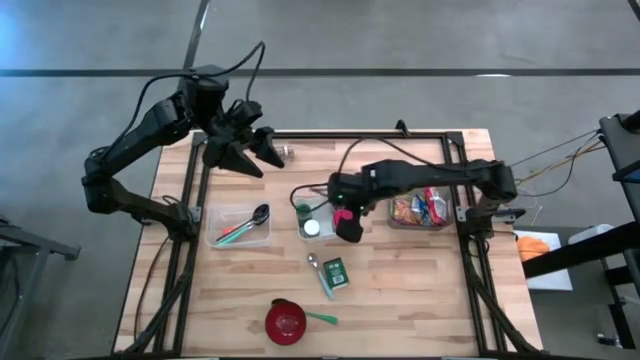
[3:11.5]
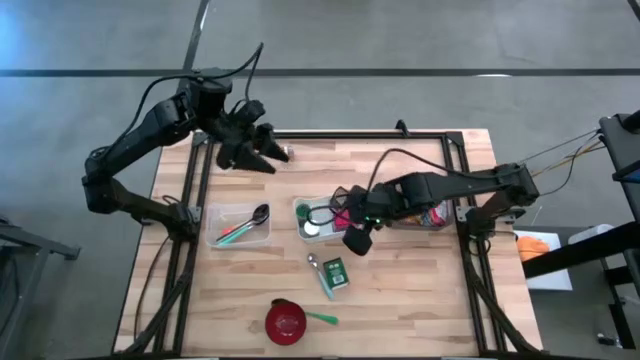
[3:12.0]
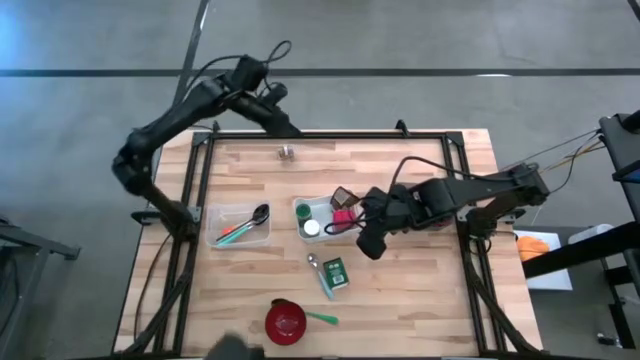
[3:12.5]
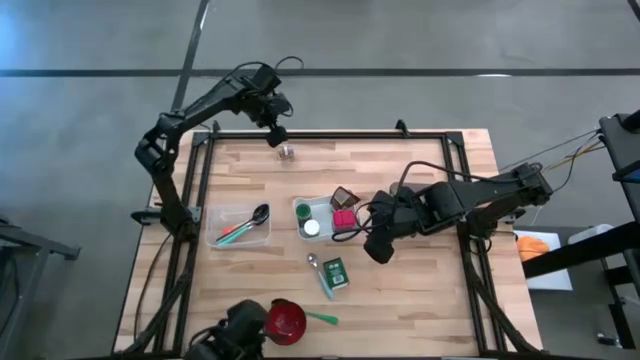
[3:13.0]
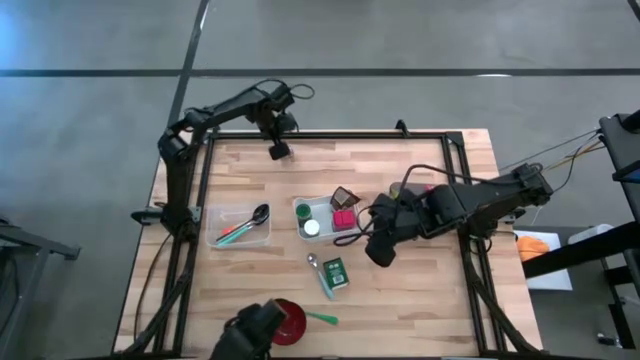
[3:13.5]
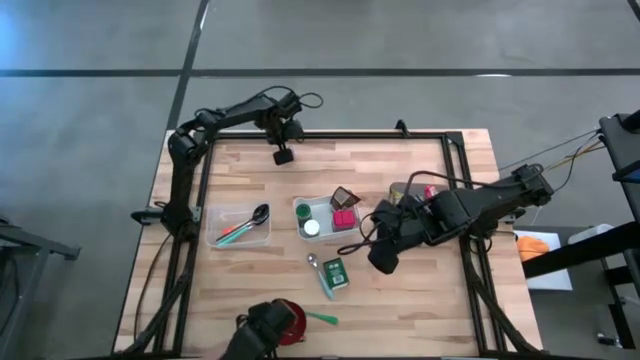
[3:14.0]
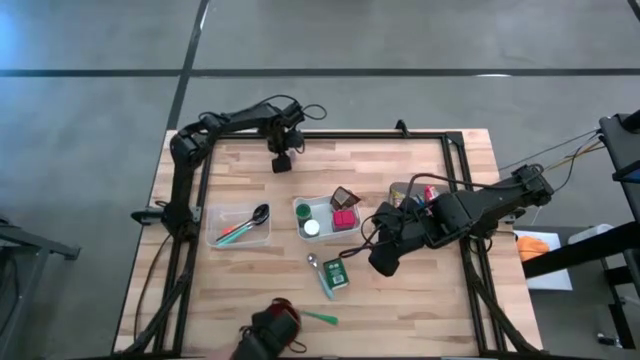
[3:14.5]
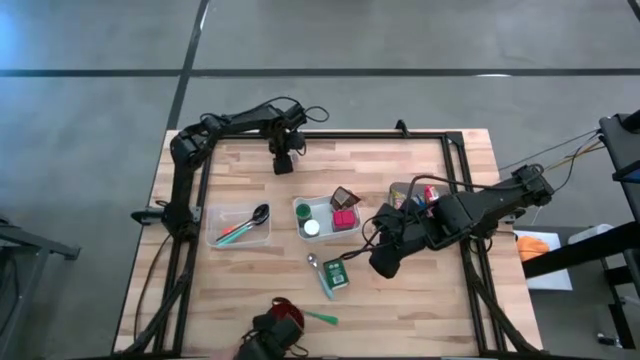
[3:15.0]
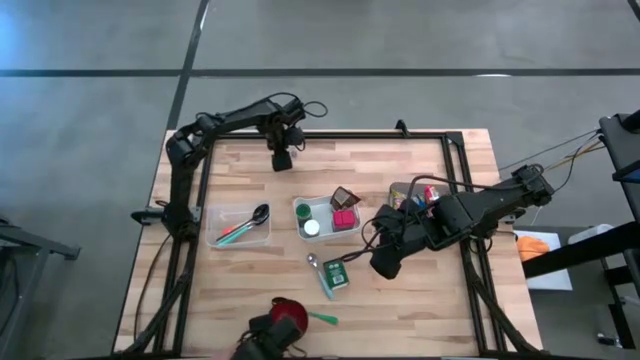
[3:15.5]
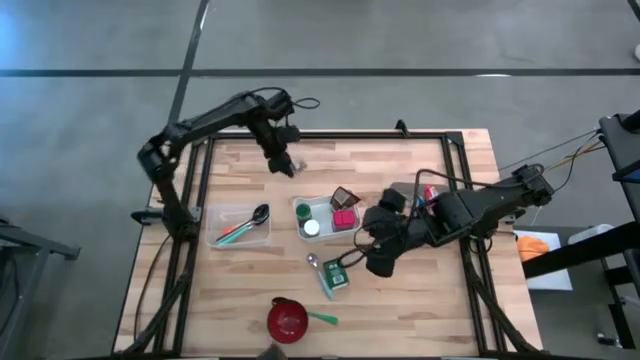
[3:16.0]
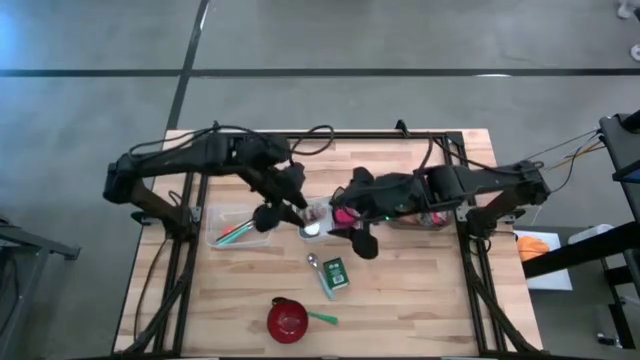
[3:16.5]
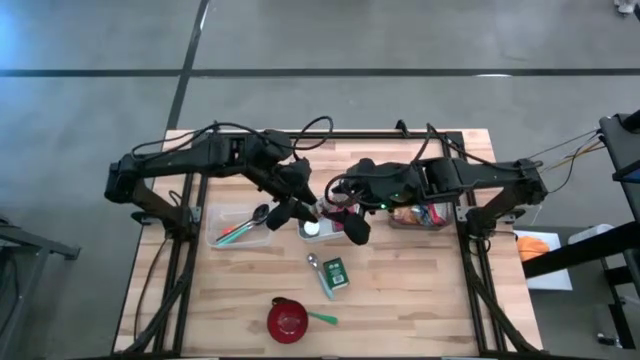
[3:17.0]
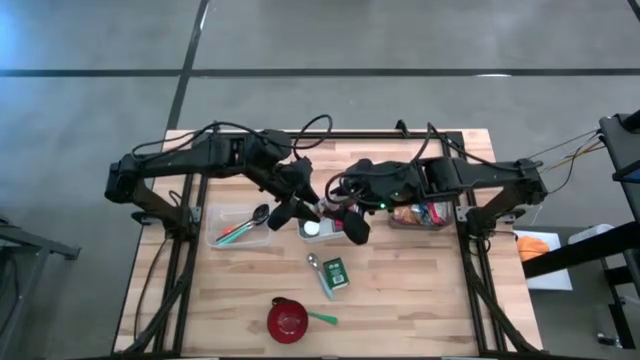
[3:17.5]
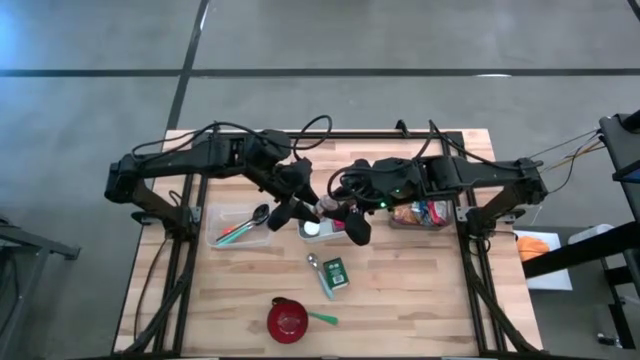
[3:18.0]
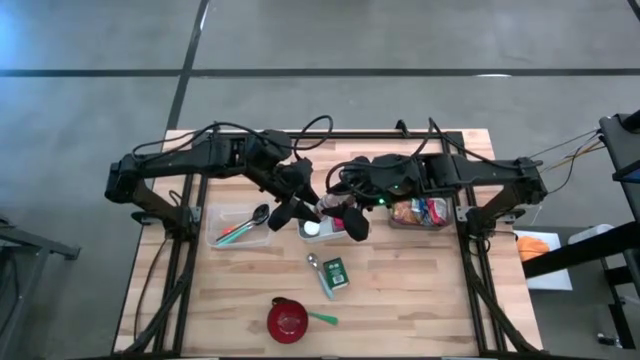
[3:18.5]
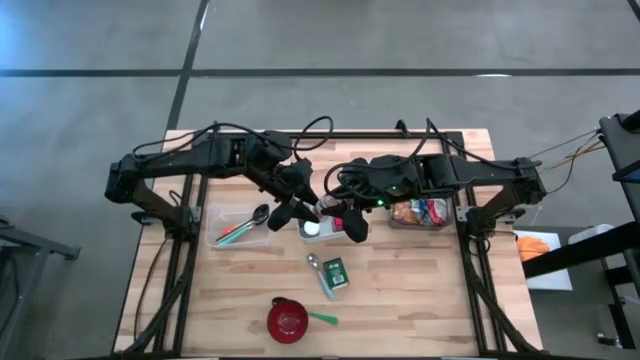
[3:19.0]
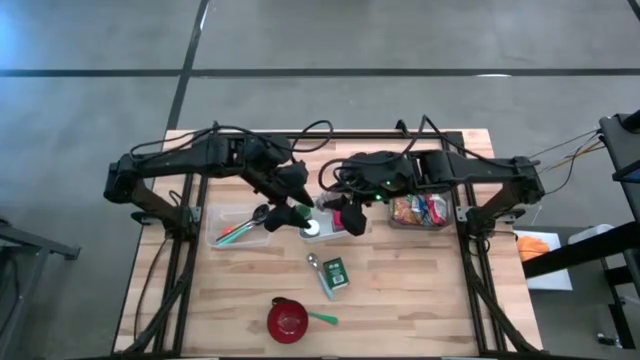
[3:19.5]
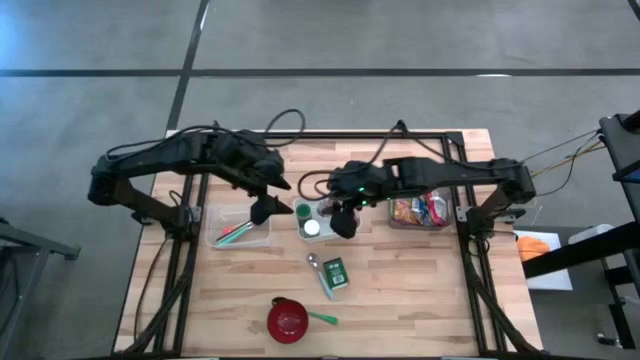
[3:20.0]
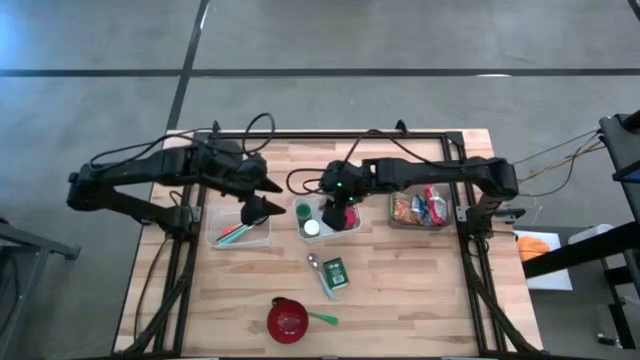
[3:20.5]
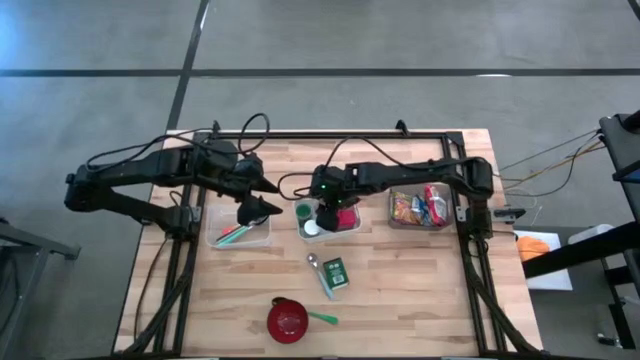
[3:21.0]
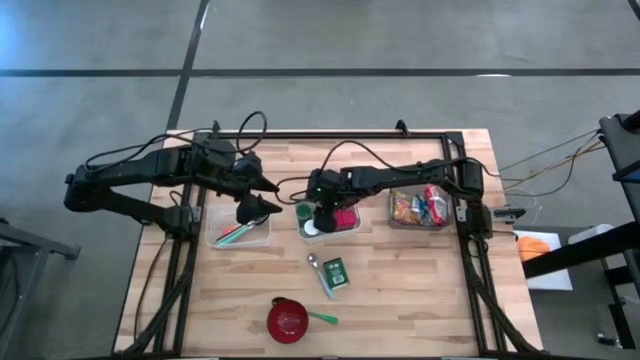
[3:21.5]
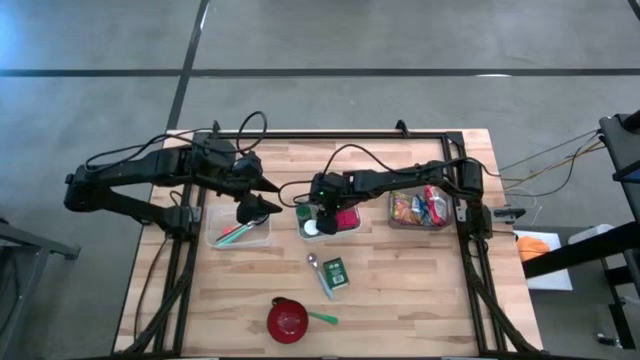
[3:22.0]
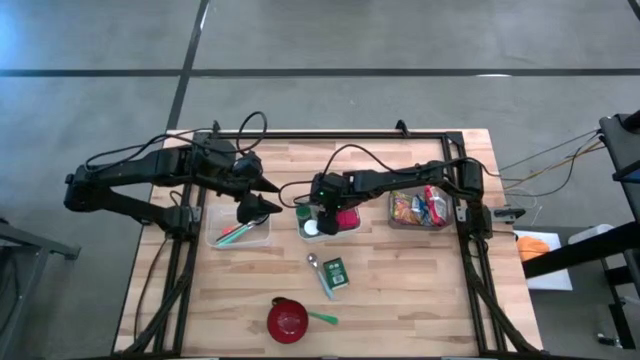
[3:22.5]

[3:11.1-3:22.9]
Put the brown seasoning bottle into the white bin
